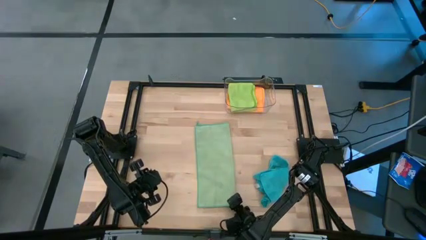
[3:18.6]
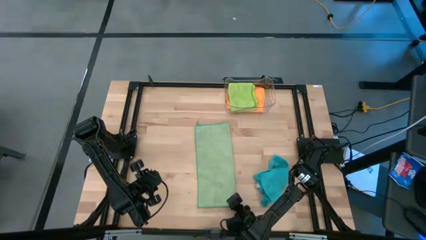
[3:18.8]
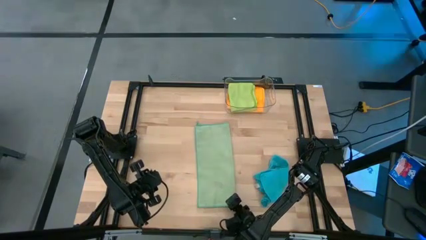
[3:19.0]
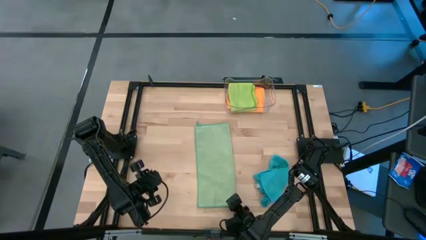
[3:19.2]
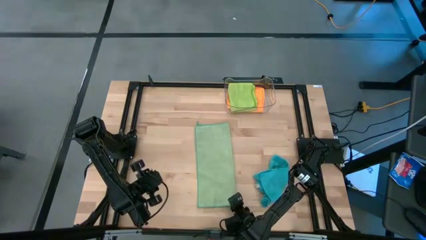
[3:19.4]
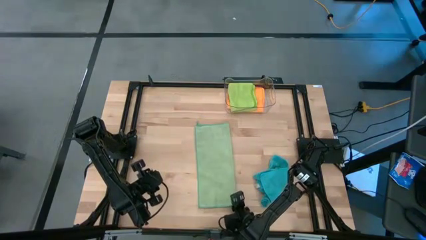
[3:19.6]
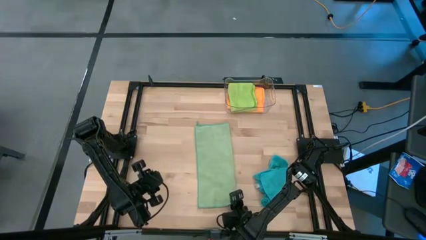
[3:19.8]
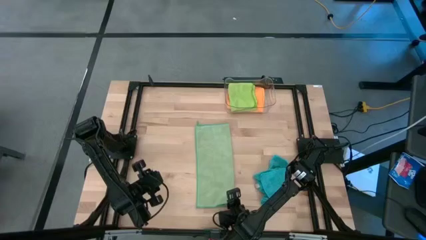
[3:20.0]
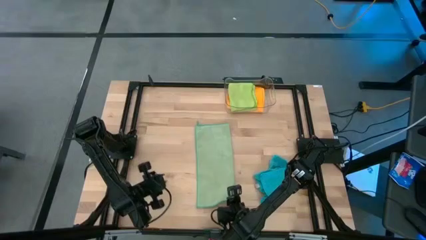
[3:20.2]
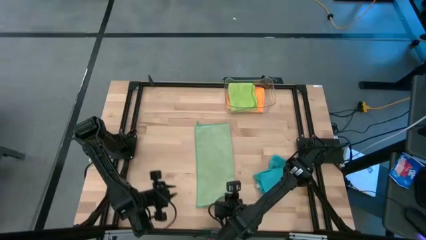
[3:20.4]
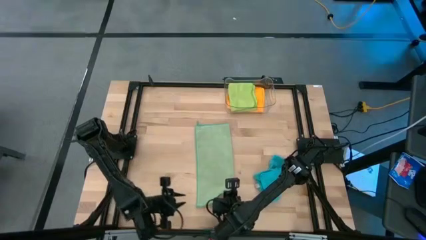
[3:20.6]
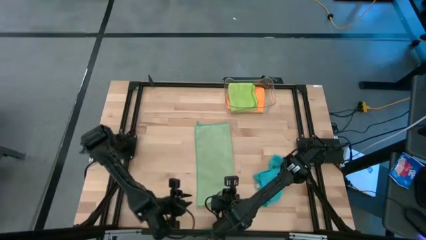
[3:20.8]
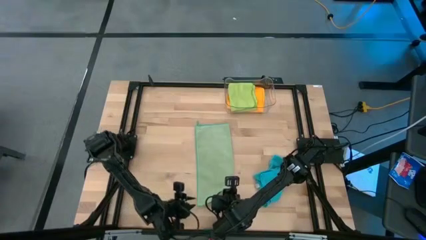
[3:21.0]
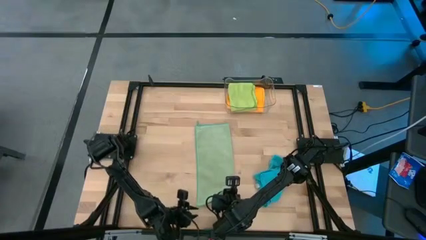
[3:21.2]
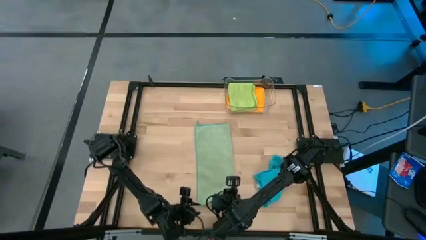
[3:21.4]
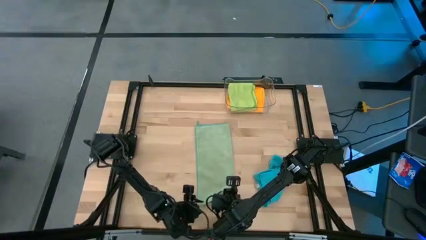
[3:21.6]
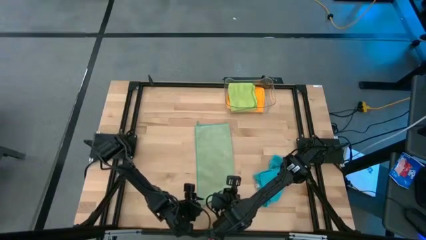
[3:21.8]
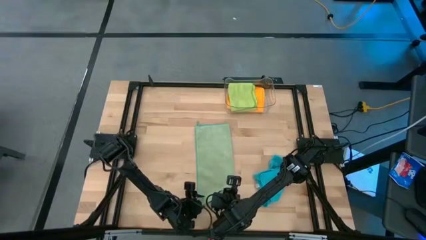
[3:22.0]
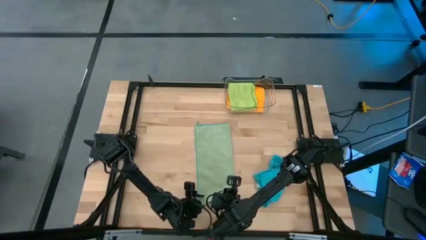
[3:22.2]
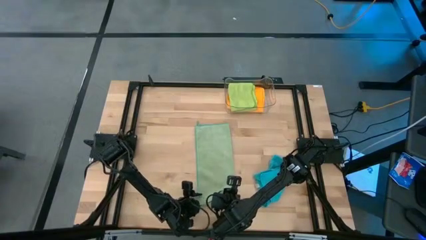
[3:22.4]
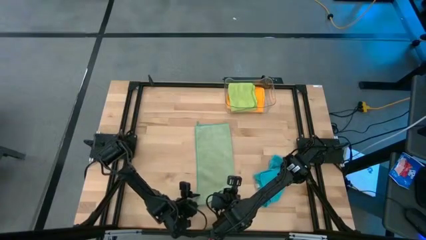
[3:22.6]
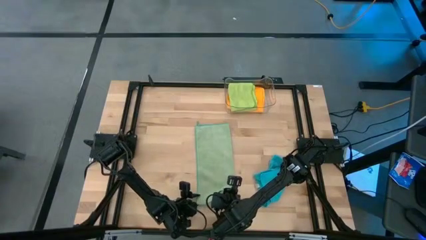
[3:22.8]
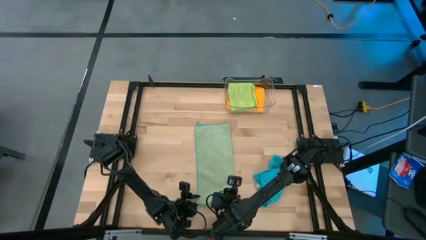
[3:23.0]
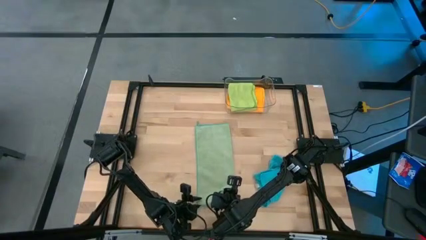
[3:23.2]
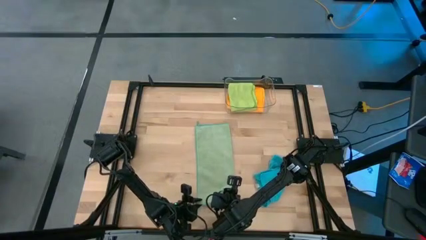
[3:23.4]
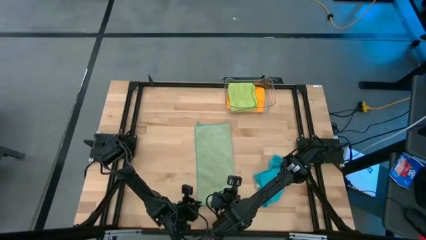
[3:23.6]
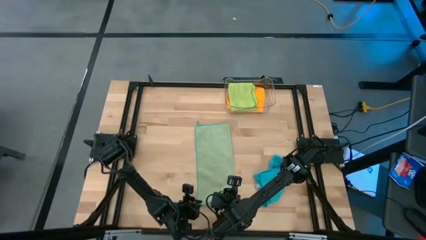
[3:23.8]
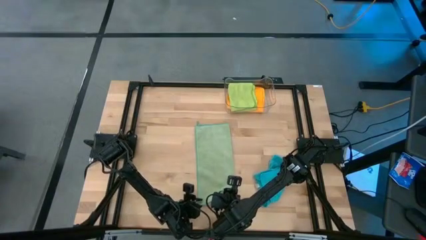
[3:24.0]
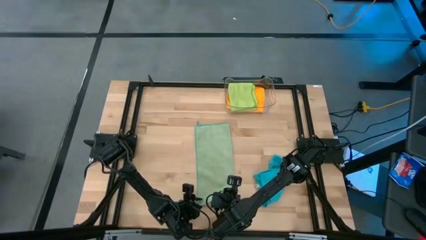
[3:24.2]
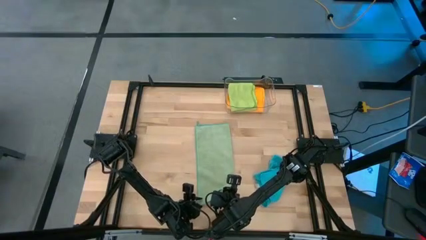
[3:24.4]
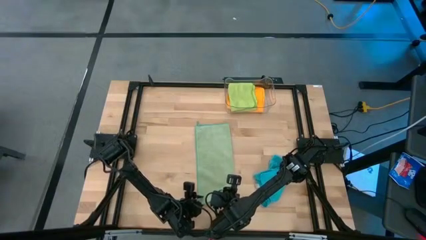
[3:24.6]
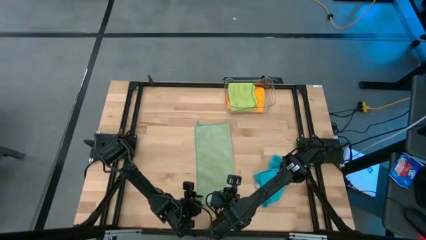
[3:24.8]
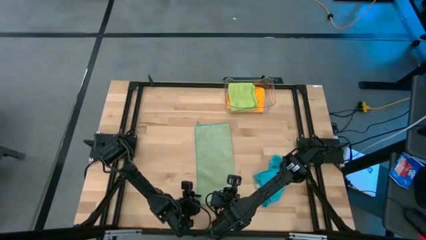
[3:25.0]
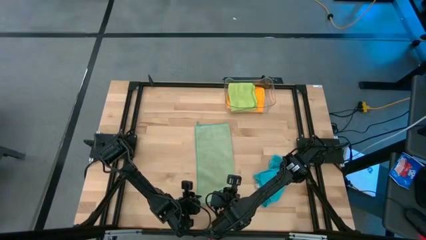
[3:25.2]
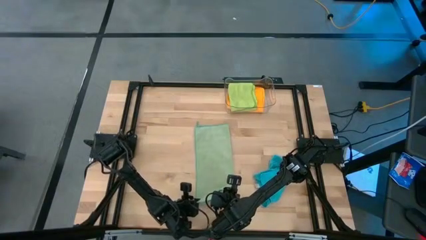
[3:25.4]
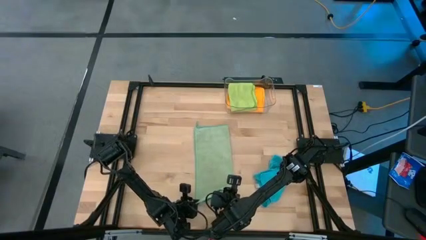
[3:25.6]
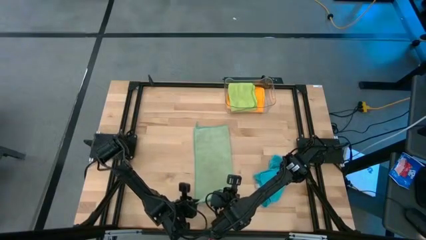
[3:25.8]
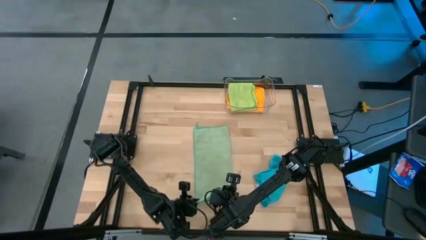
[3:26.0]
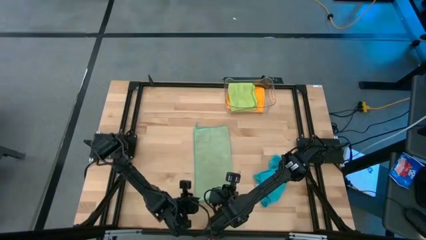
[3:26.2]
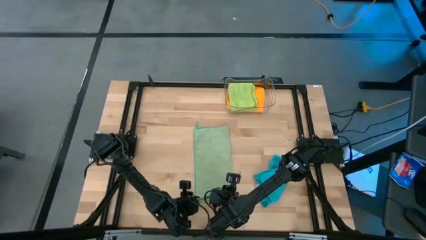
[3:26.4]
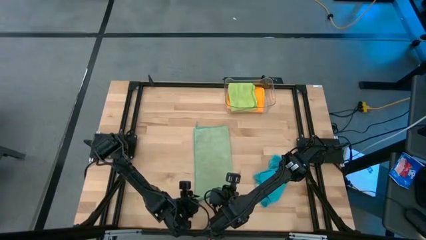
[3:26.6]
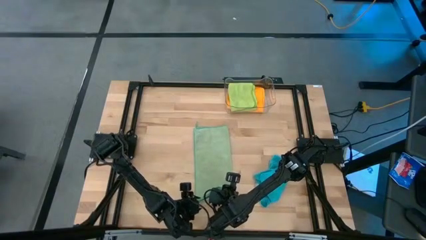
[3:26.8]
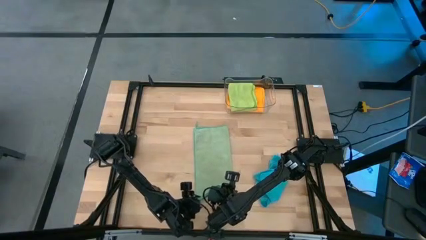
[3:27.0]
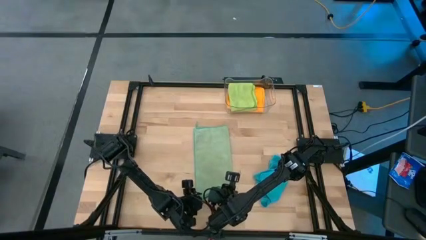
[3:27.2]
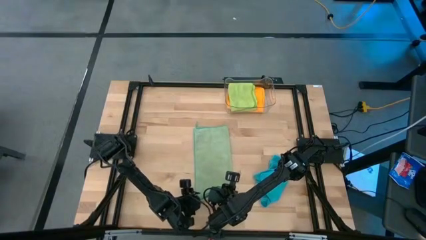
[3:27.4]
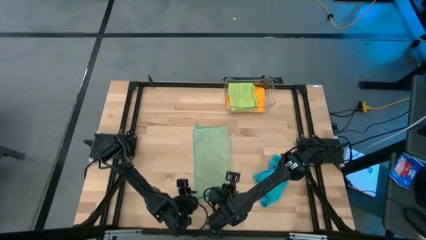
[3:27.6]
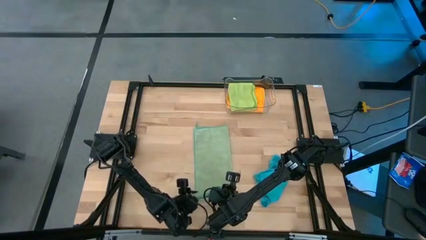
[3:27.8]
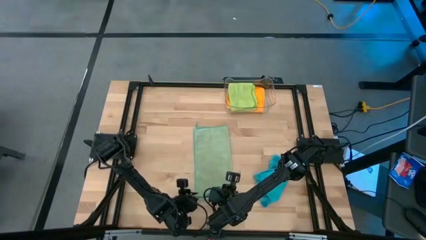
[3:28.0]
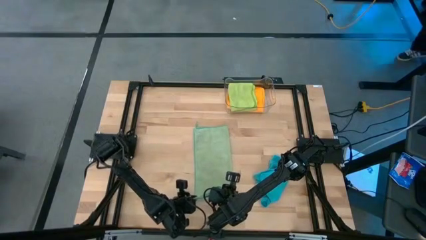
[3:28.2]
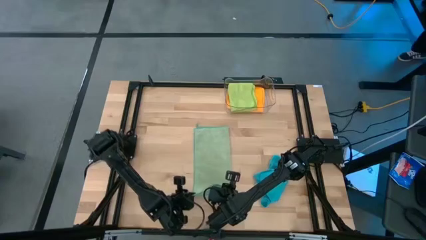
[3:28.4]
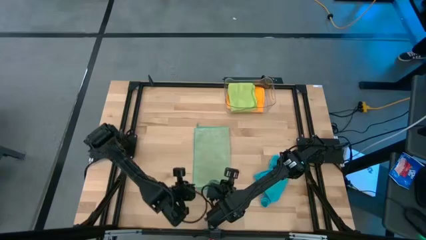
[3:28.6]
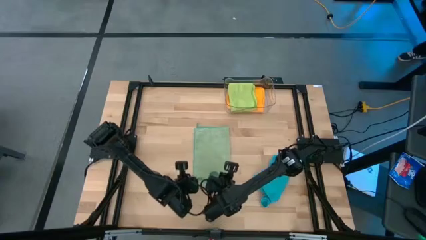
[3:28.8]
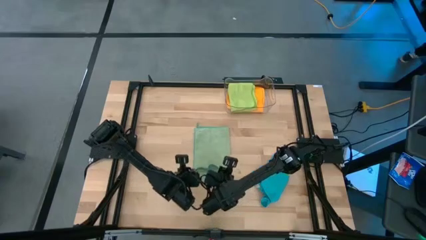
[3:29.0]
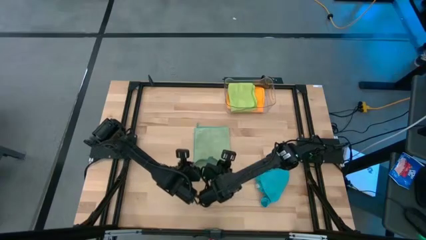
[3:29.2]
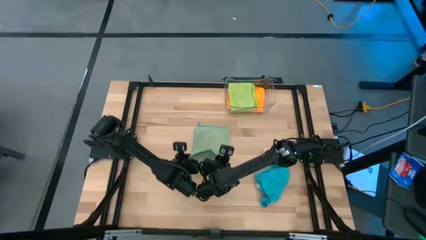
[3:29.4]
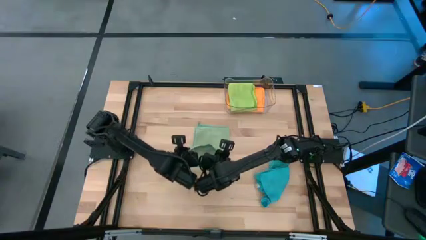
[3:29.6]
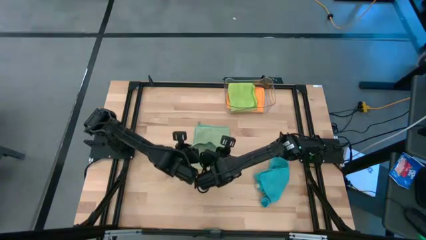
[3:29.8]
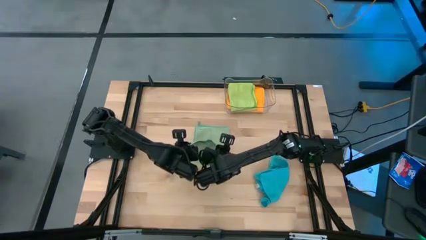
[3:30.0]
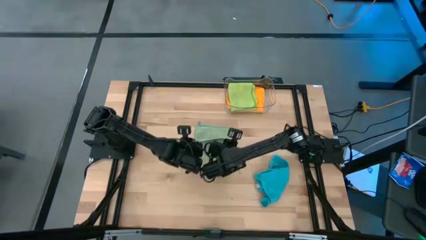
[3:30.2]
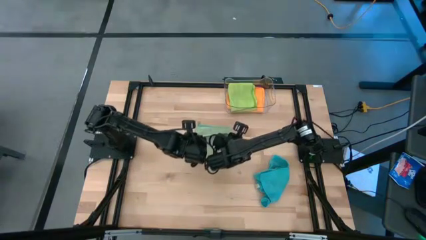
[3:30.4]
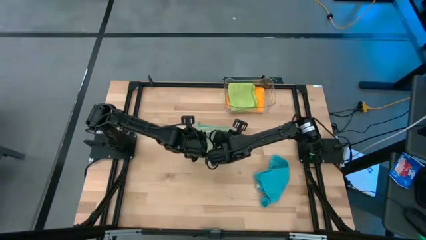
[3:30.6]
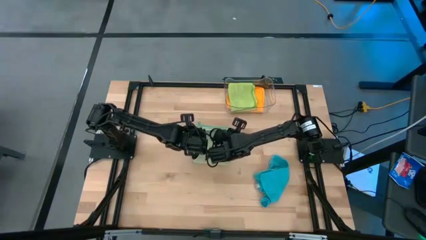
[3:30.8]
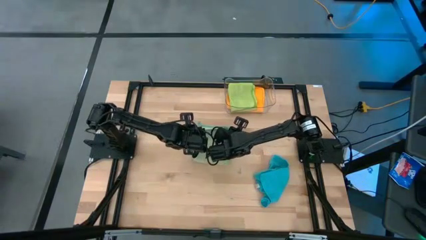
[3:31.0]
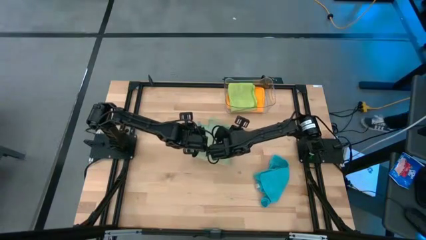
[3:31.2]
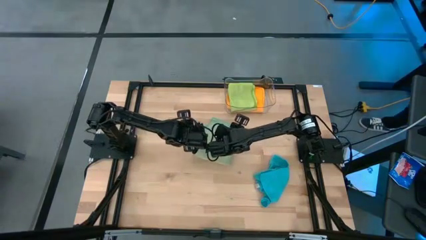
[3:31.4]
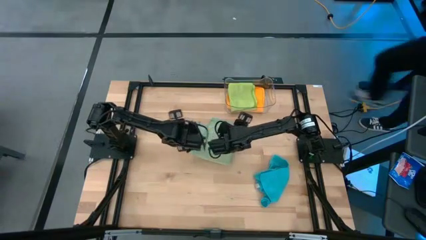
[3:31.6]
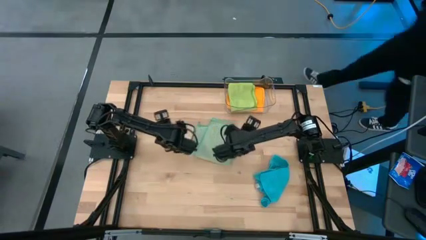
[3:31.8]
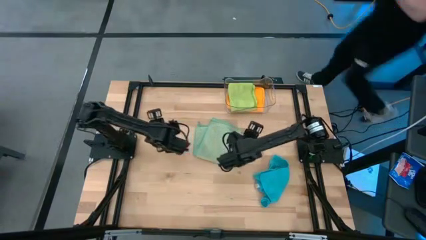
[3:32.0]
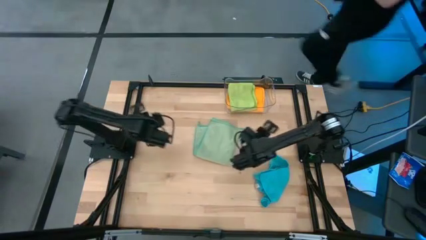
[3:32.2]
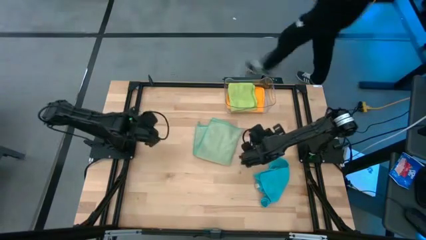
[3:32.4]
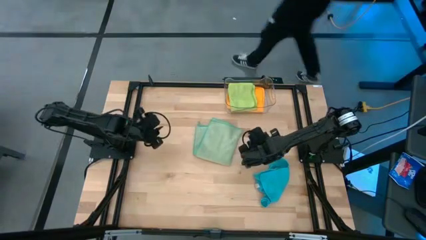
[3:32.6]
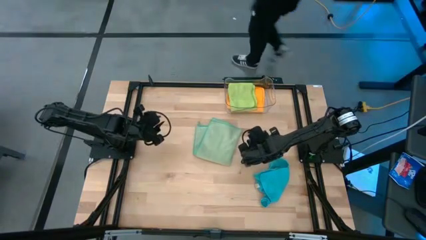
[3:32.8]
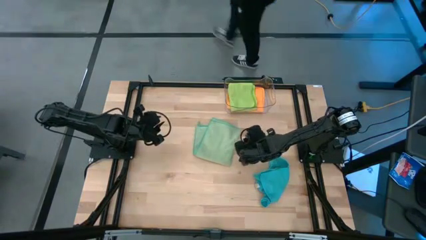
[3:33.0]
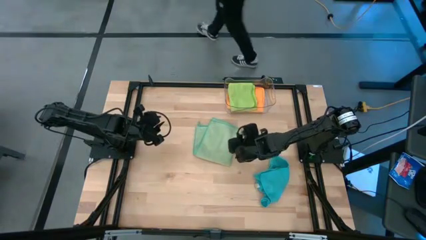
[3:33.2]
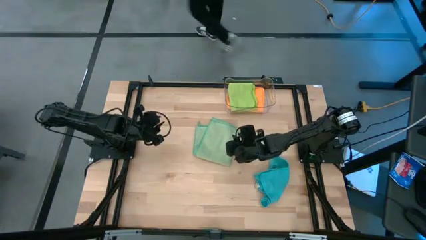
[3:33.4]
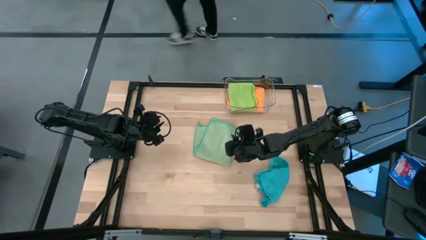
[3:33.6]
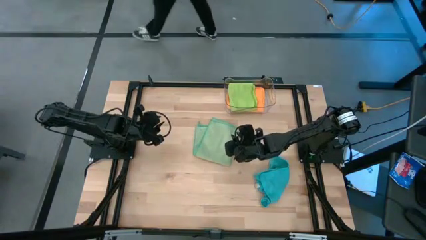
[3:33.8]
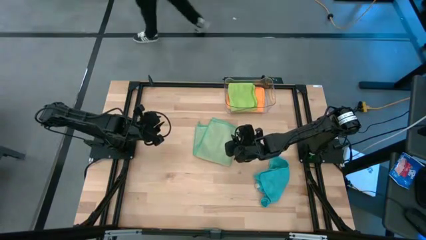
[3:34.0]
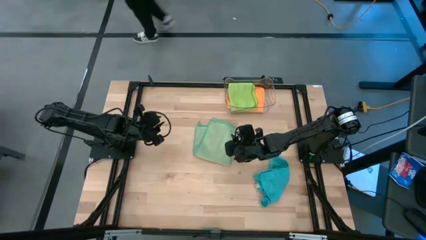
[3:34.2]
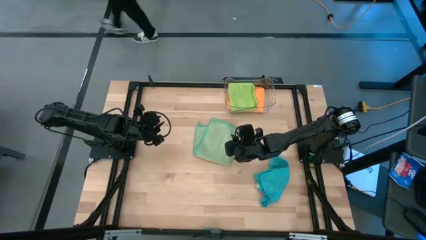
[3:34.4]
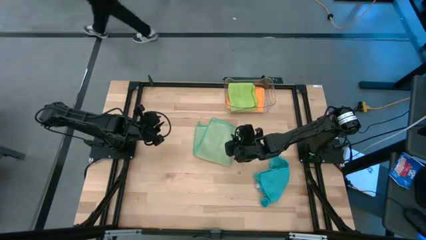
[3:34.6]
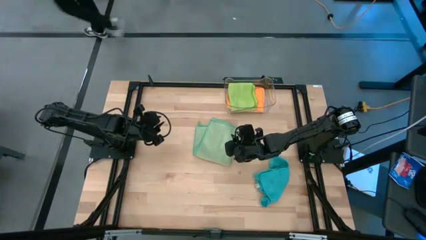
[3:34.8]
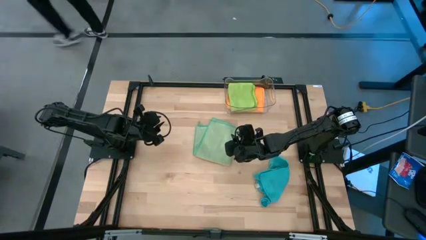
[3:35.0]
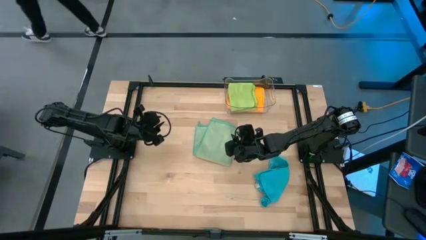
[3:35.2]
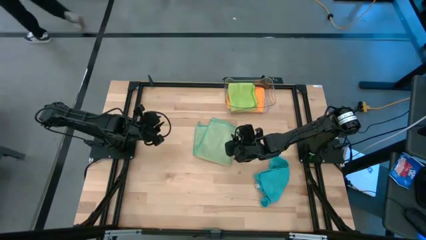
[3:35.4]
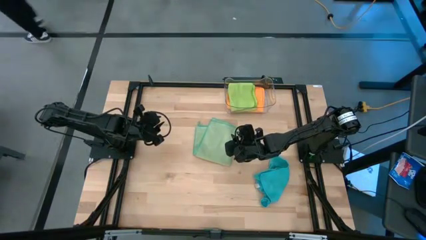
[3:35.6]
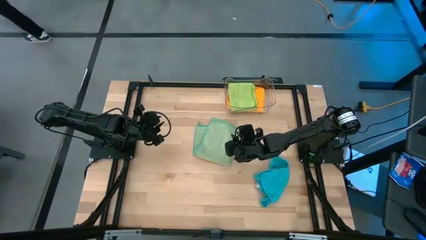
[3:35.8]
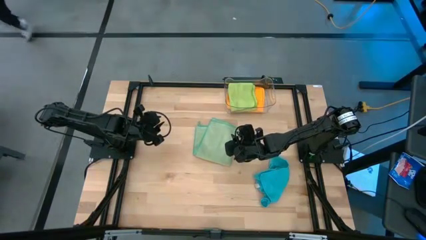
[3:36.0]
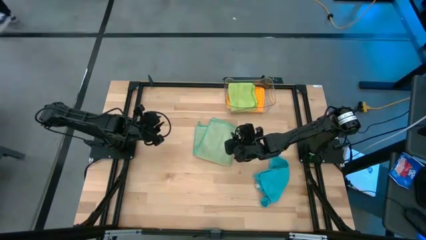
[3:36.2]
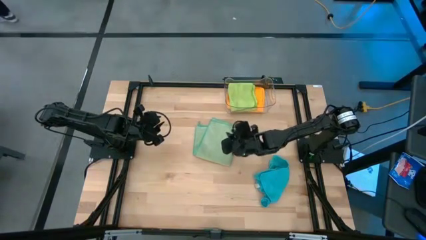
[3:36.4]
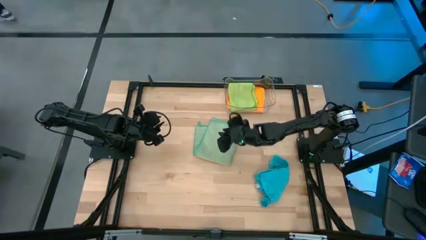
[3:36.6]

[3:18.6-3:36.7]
Task: Fold microfiber towels
Fold the green microfiber towel
